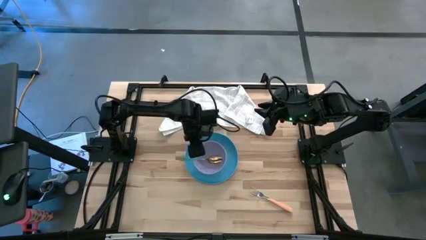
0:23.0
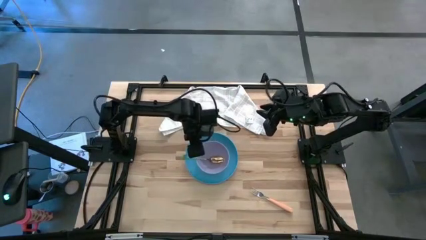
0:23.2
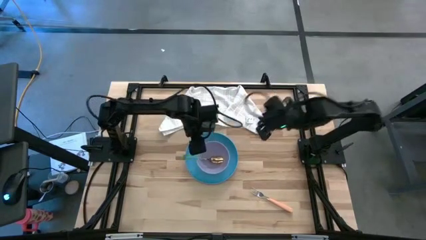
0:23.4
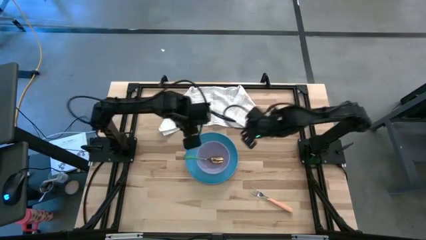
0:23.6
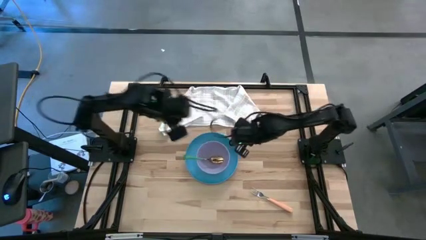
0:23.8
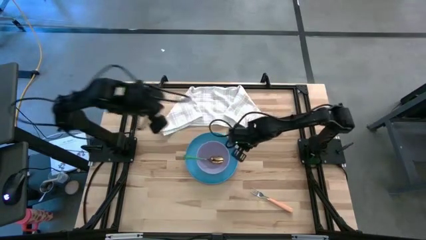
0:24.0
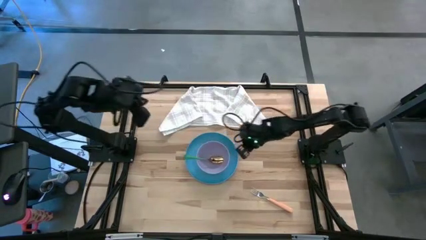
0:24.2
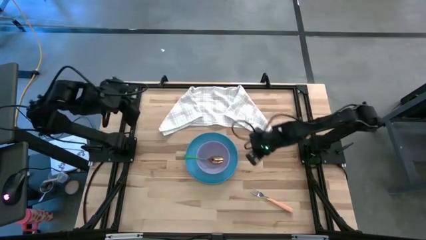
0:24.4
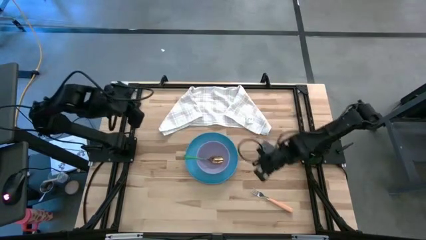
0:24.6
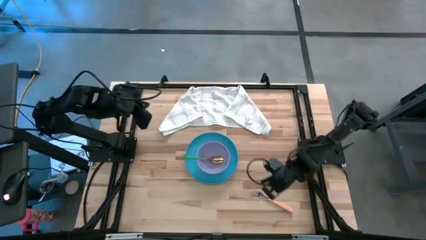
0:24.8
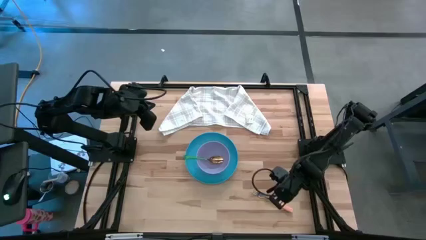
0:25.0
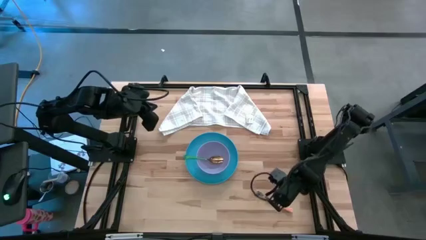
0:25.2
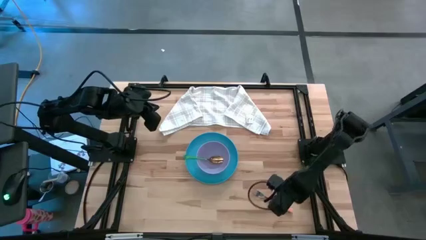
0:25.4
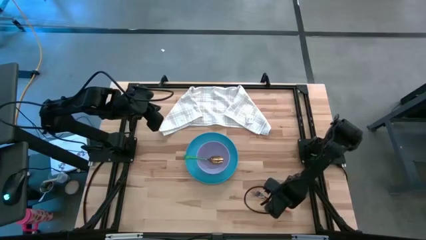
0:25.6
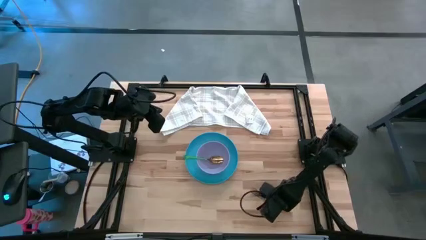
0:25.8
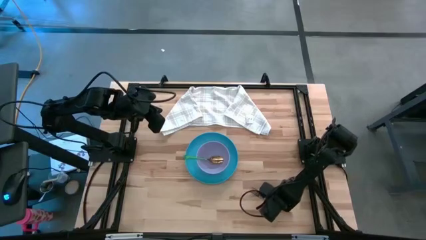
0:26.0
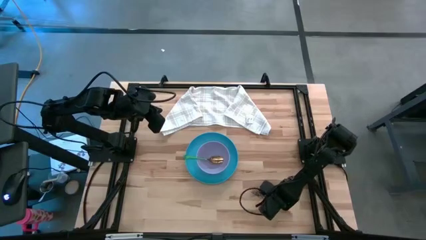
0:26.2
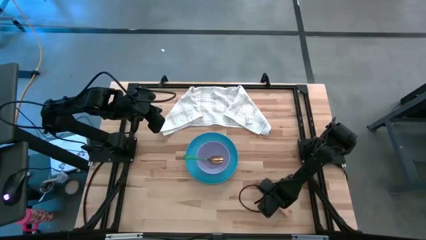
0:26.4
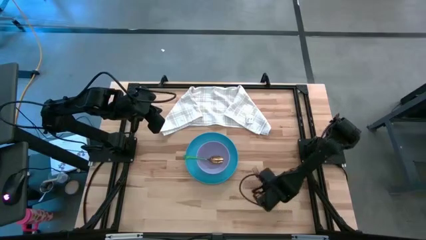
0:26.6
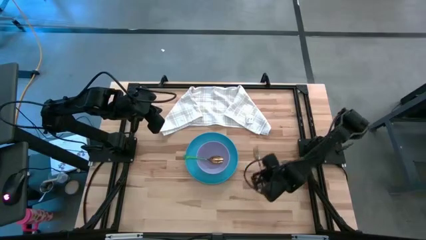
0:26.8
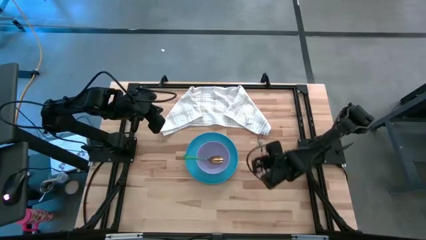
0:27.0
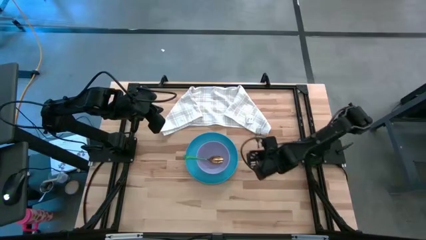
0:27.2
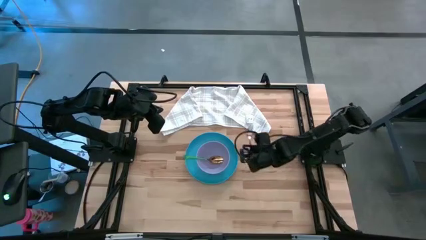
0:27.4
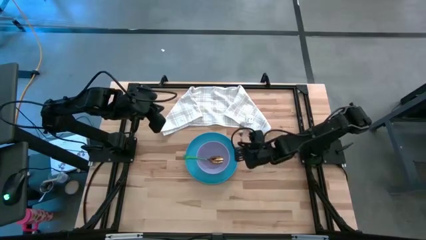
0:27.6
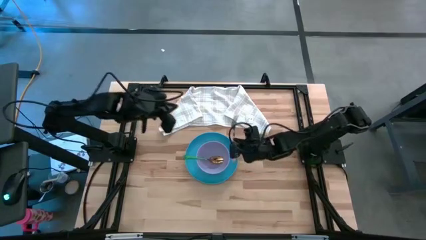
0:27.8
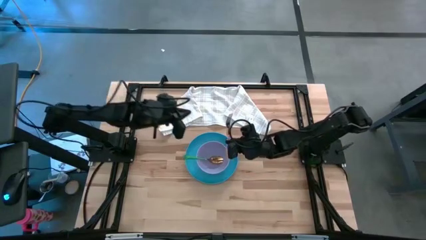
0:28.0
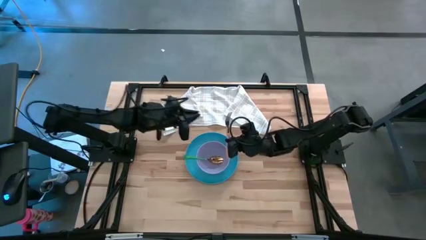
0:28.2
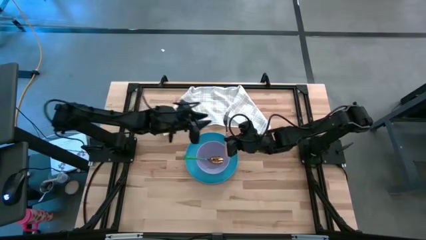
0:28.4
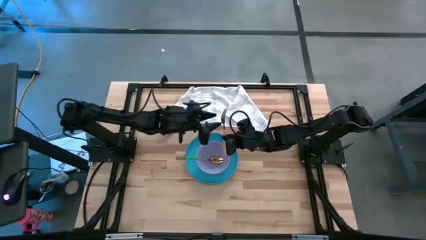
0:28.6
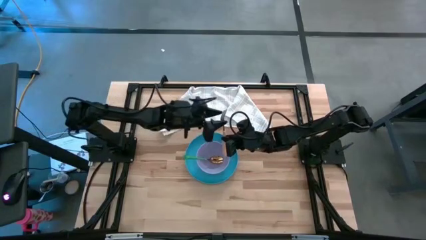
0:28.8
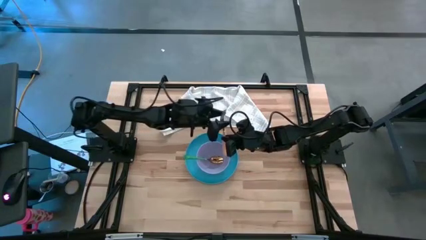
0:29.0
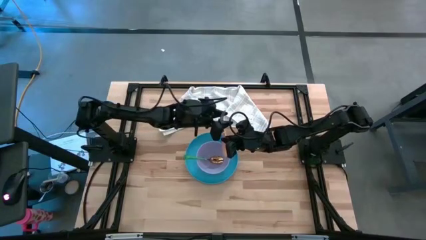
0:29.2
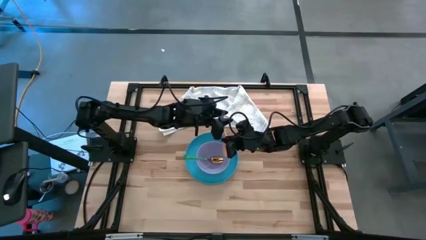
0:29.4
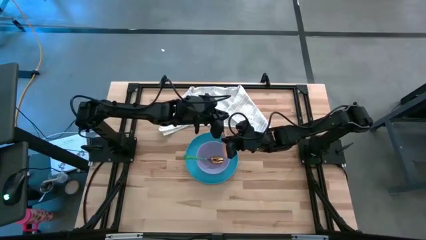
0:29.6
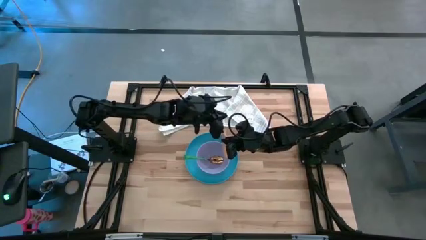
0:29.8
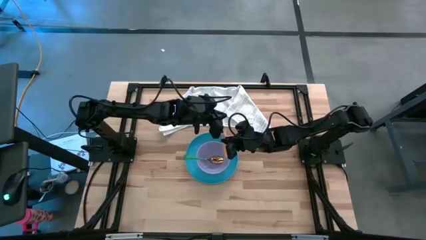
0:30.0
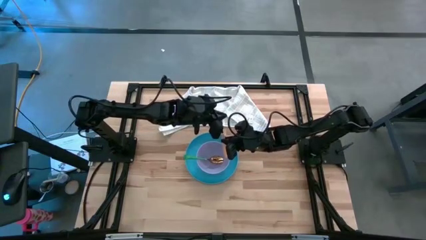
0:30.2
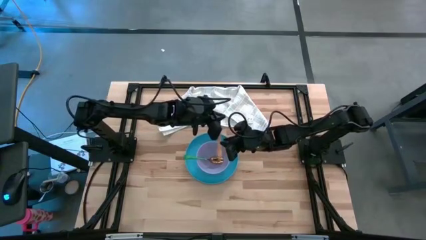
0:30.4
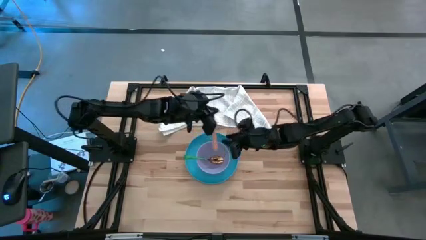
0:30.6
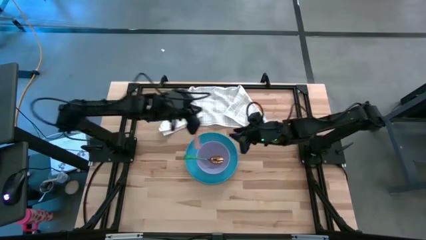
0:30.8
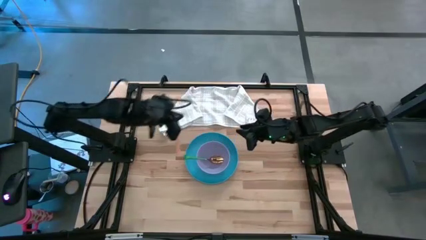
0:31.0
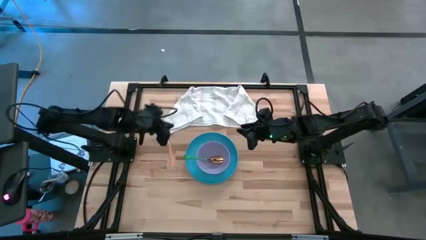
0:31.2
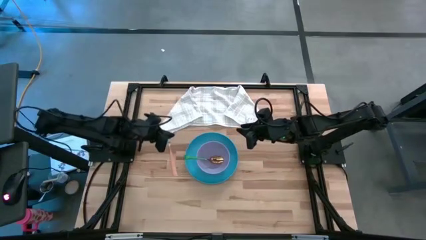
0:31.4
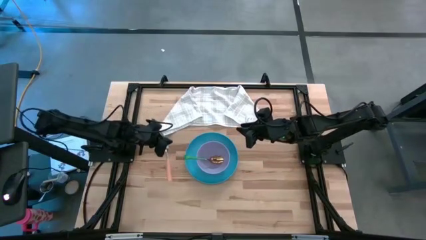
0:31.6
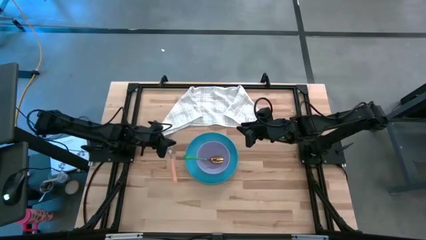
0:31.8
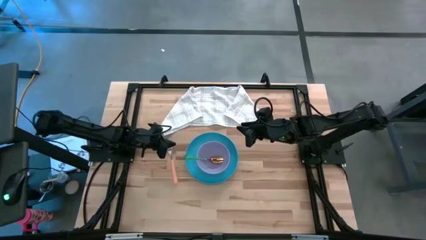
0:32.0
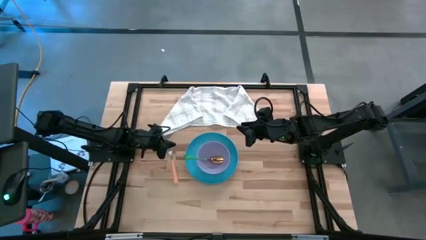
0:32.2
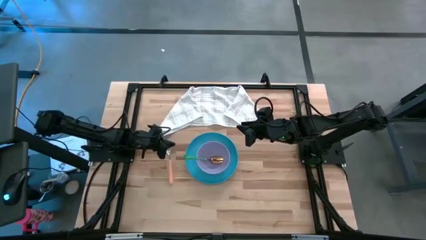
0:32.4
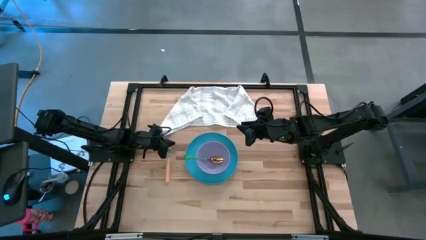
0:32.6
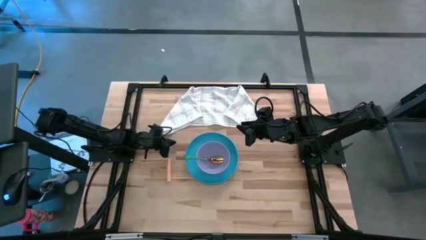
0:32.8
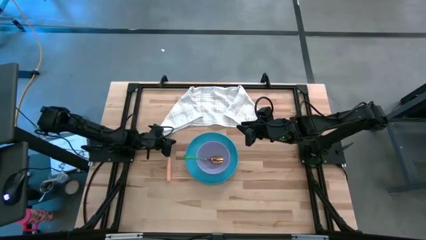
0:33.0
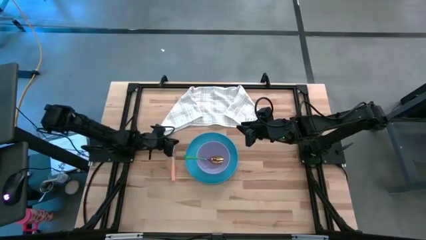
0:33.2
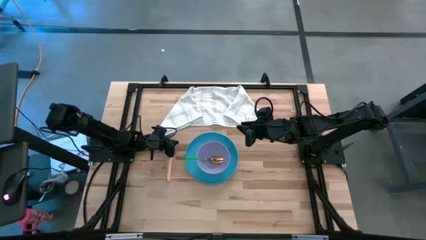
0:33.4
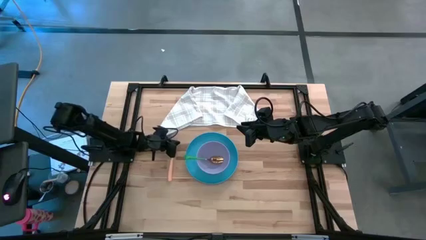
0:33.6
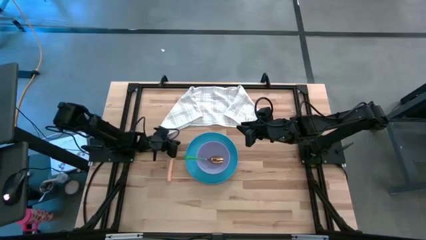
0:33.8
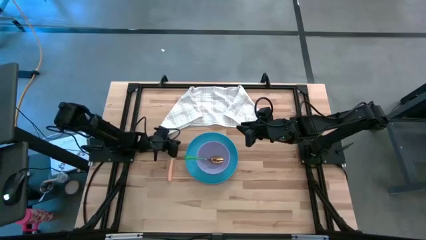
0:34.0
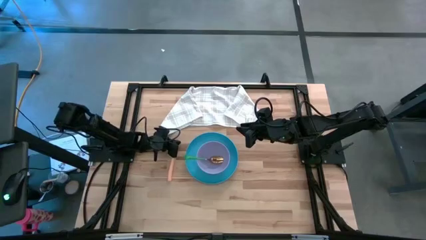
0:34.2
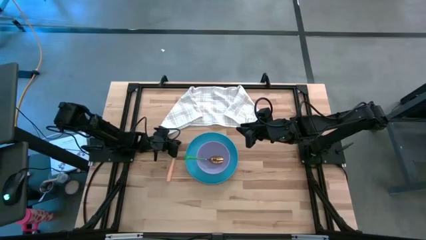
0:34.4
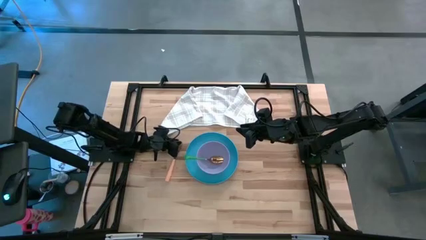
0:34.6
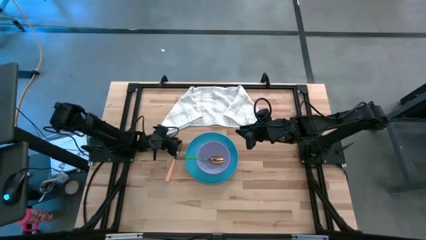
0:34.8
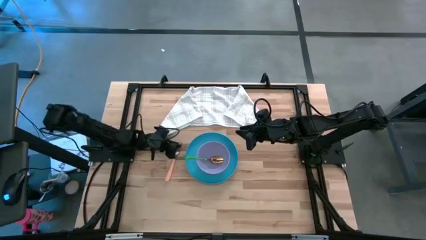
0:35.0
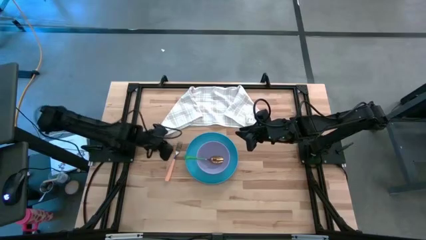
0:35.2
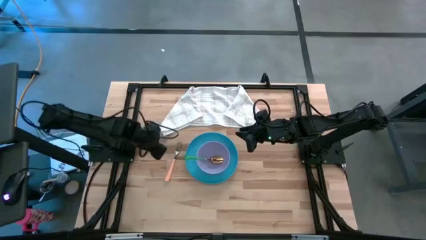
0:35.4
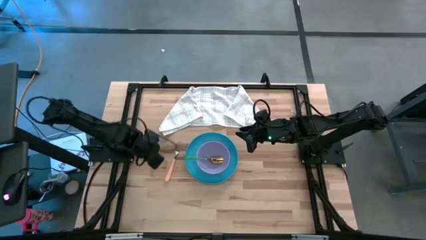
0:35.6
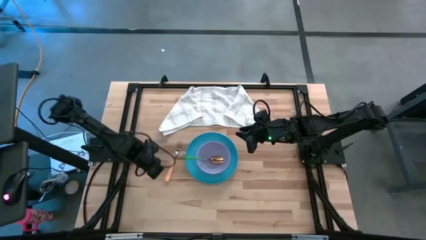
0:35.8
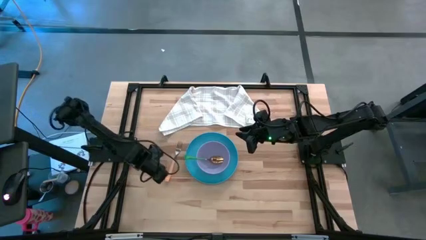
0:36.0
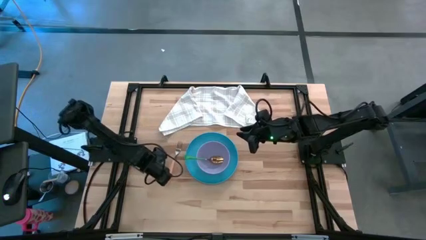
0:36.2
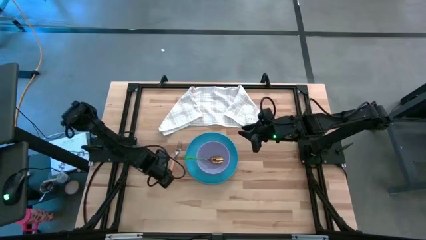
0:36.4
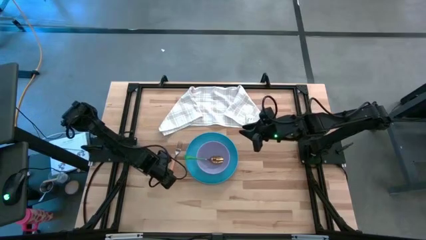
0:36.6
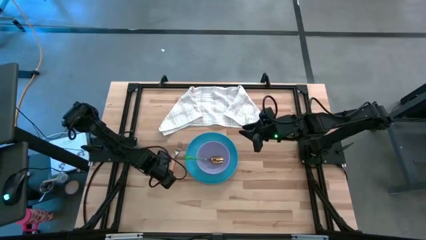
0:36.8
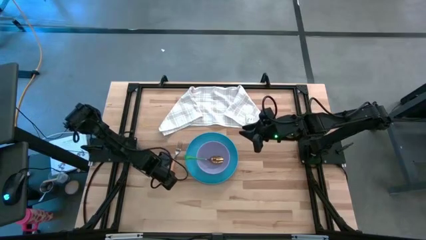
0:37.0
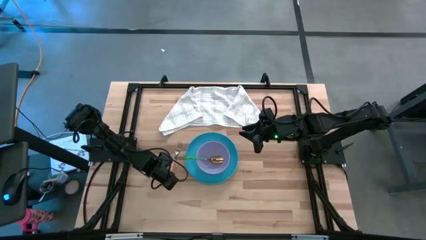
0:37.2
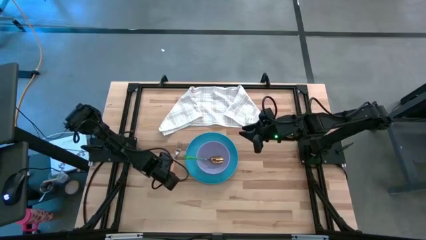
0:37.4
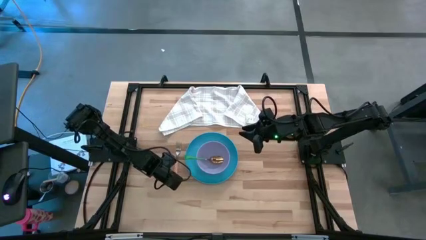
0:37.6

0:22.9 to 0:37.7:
Task: Set table place
Put the orange fork to the left of the blue plate
